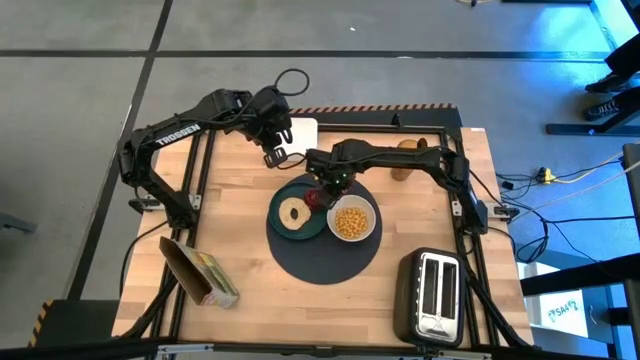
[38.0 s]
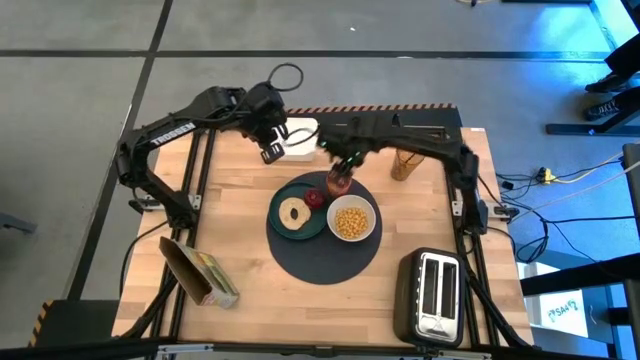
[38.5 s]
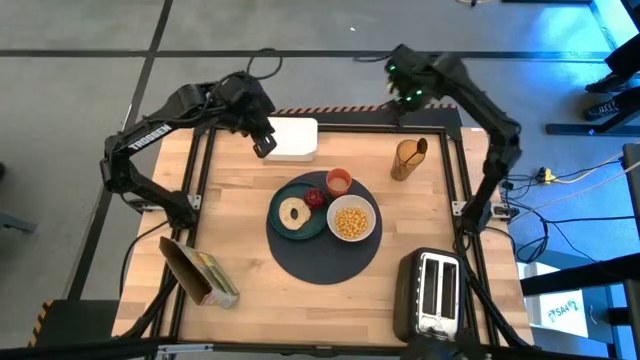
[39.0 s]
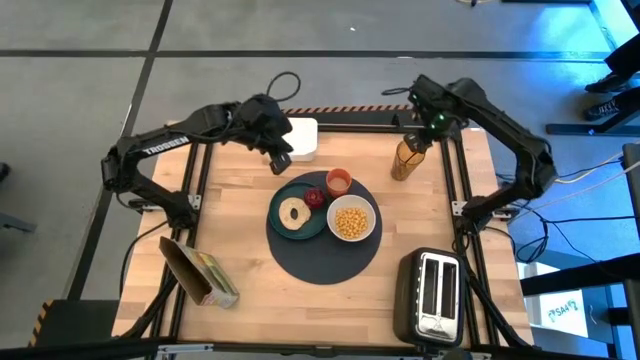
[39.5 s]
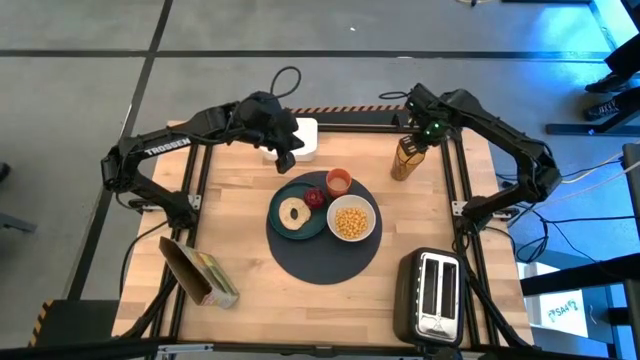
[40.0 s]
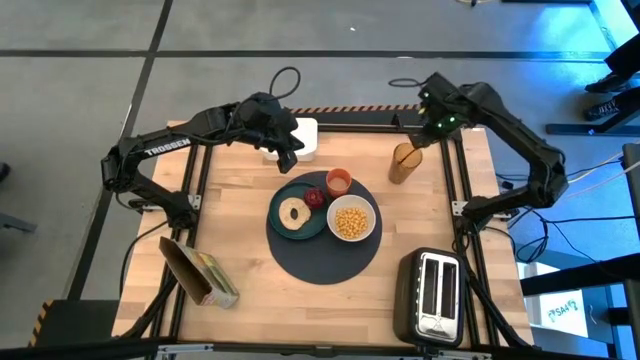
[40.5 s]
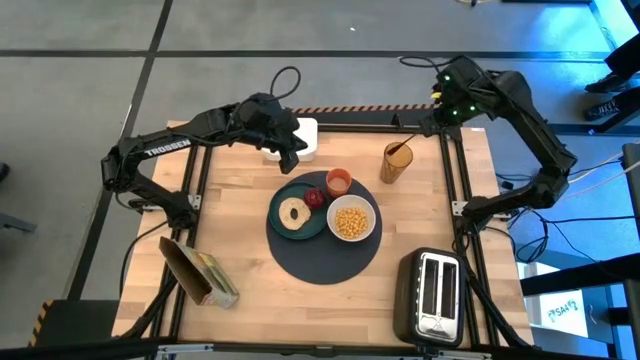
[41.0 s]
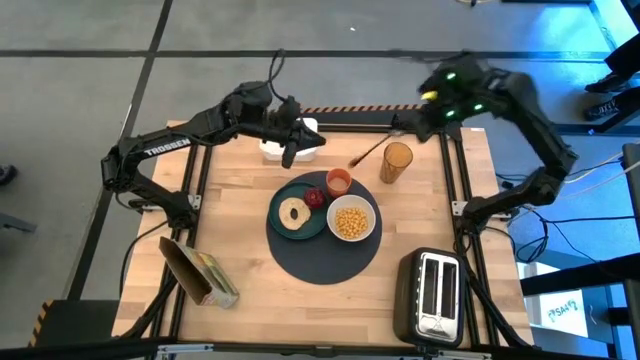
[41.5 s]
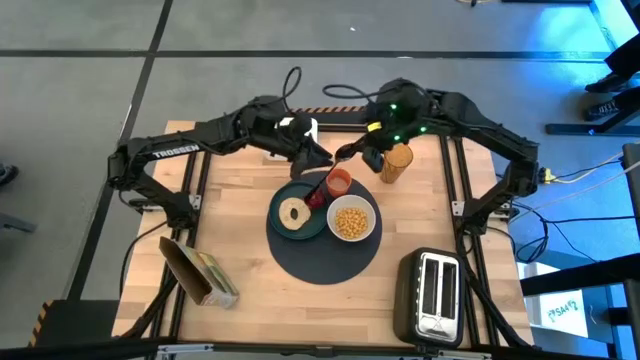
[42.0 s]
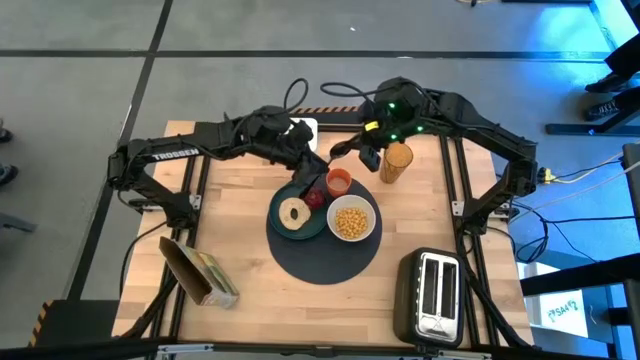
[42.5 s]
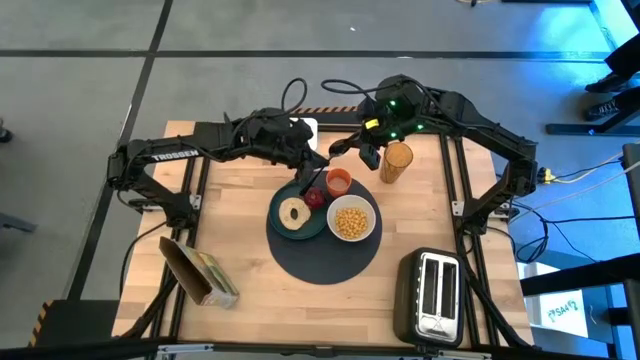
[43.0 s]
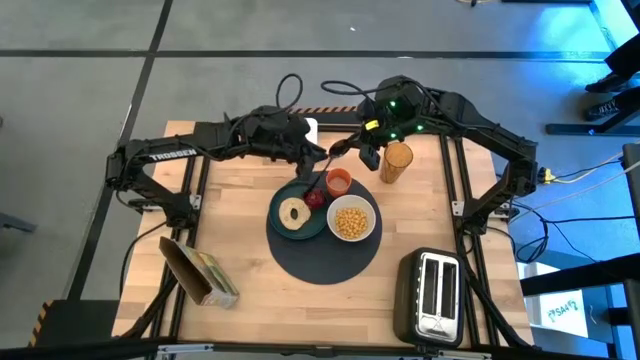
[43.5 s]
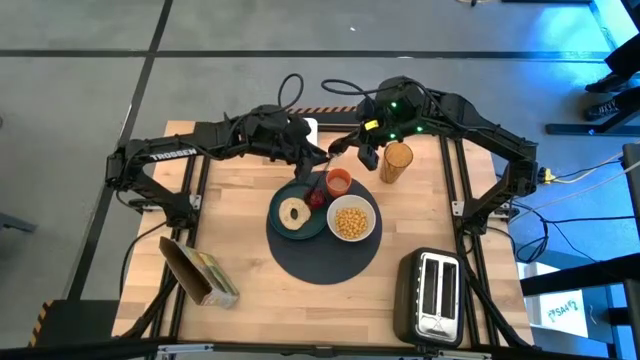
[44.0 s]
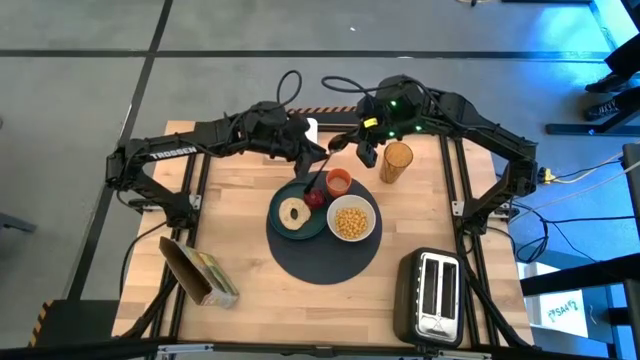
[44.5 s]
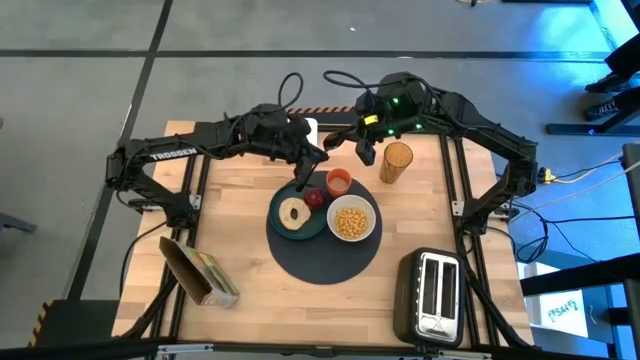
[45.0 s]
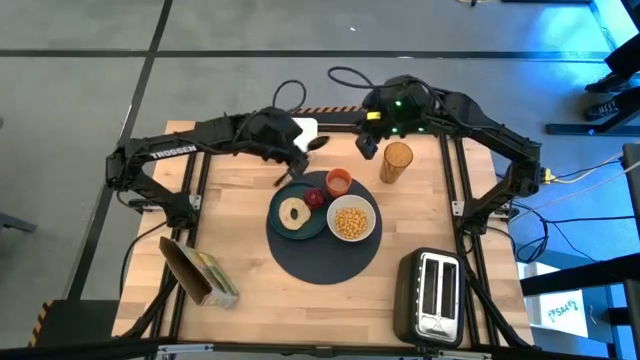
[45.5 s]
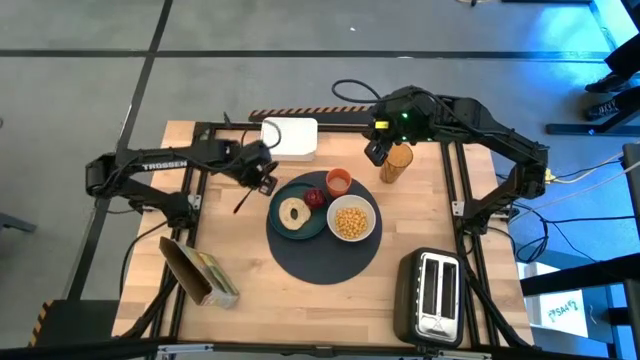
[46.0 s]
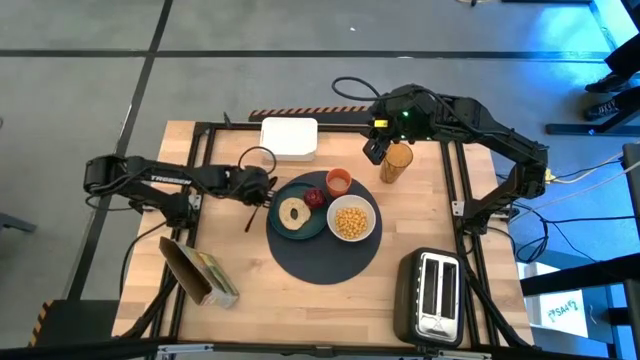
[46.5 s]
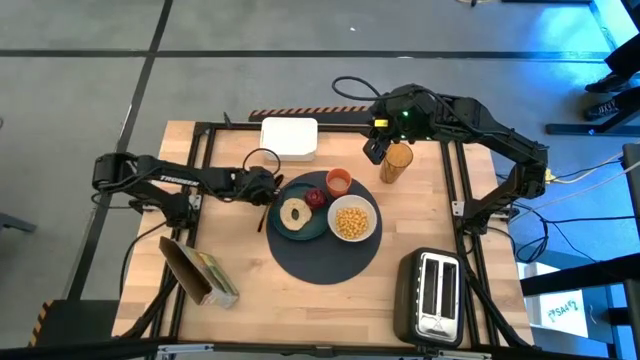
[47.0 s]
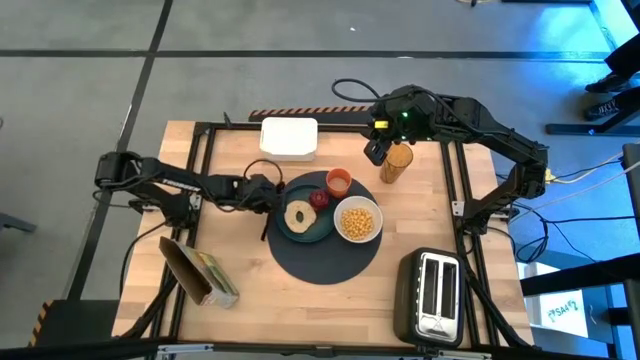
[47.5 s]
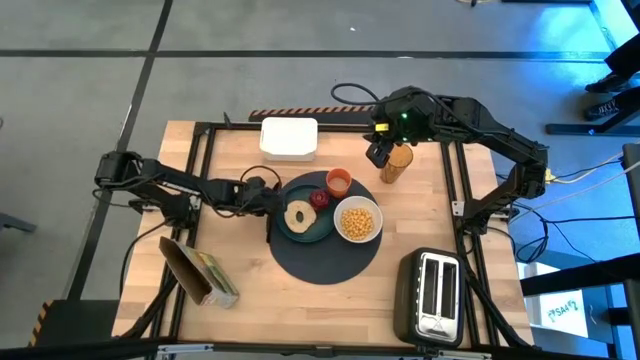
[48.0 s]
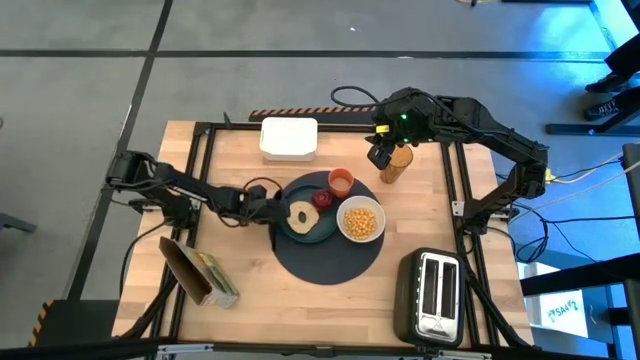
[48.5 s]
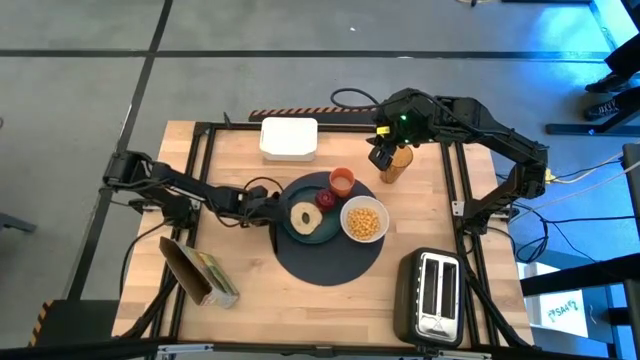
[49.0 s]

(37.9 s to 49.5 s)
Task: Arrange a breakfast setting
Put the spoon on the placemat to the left of the green plate

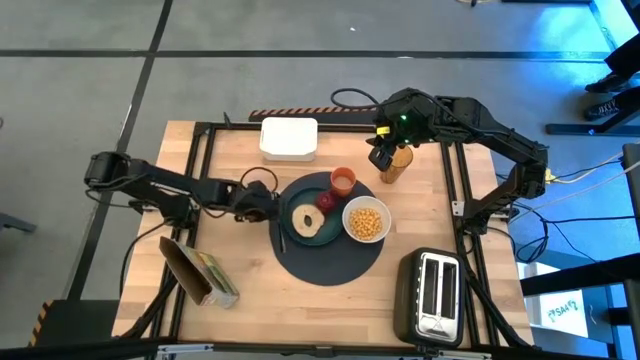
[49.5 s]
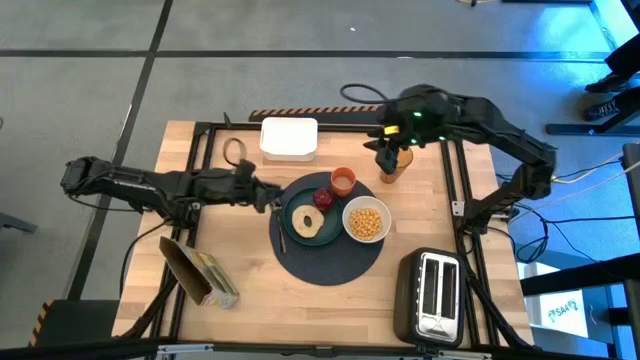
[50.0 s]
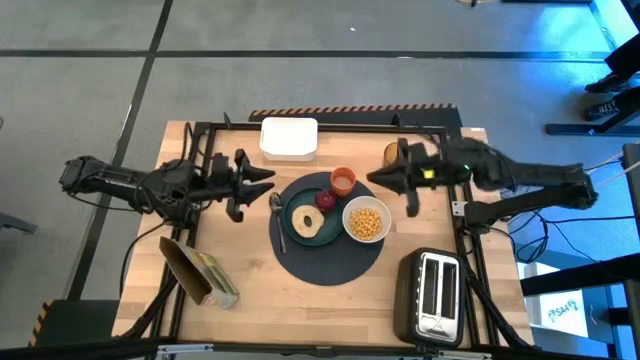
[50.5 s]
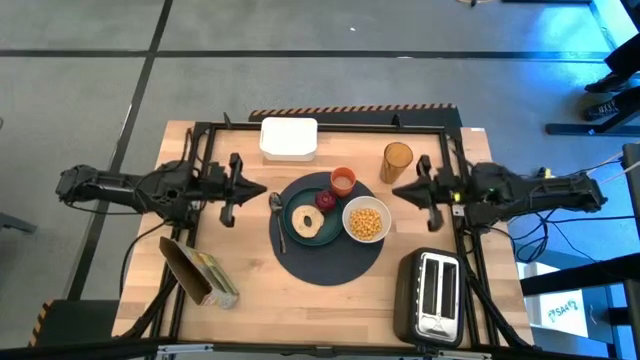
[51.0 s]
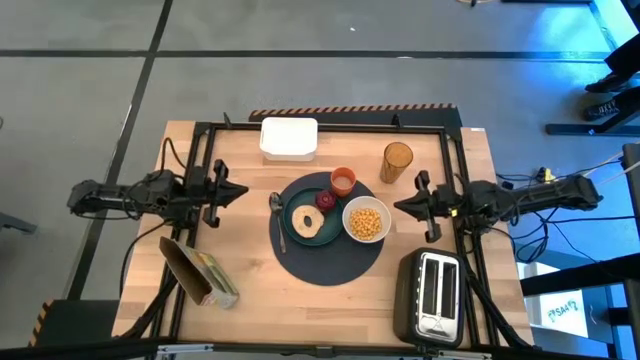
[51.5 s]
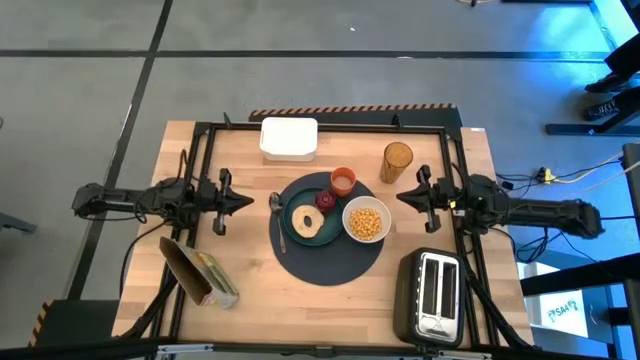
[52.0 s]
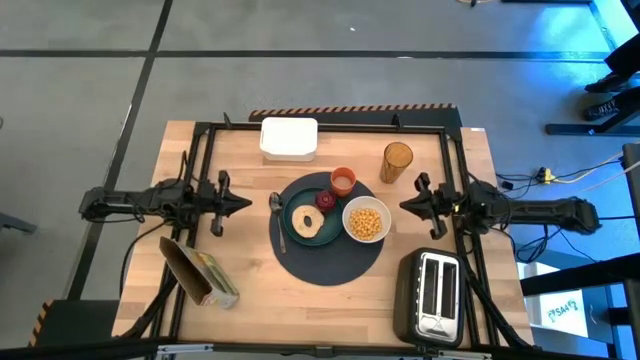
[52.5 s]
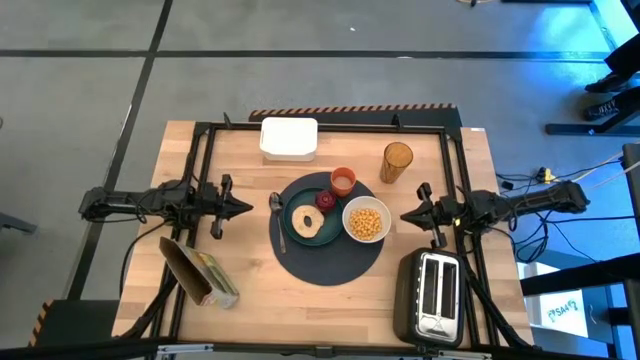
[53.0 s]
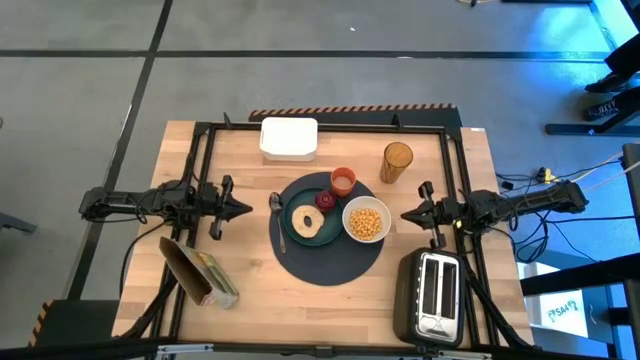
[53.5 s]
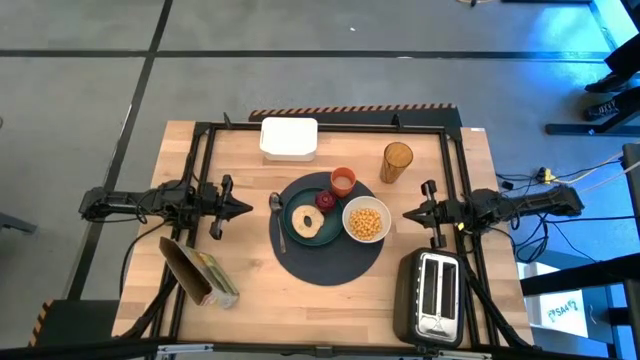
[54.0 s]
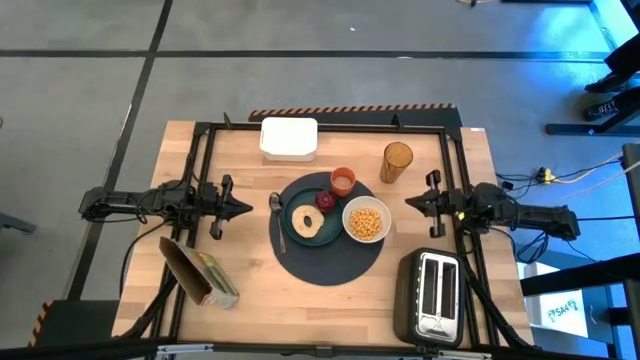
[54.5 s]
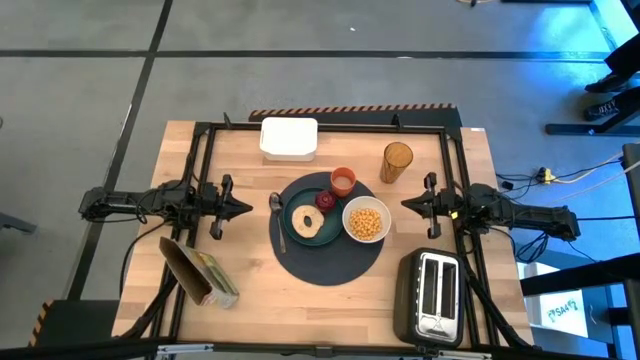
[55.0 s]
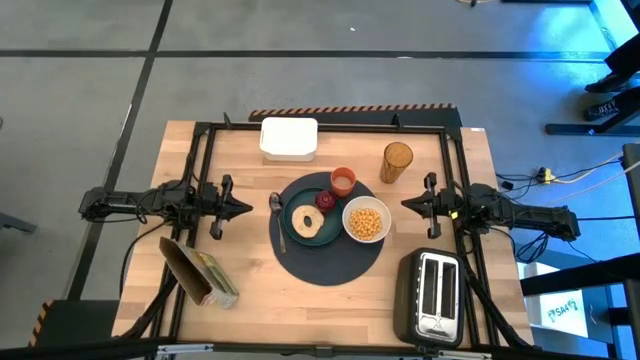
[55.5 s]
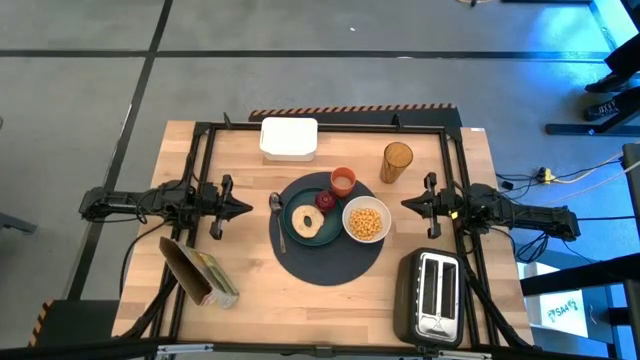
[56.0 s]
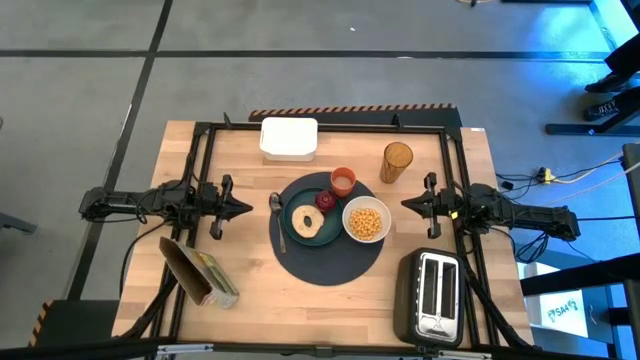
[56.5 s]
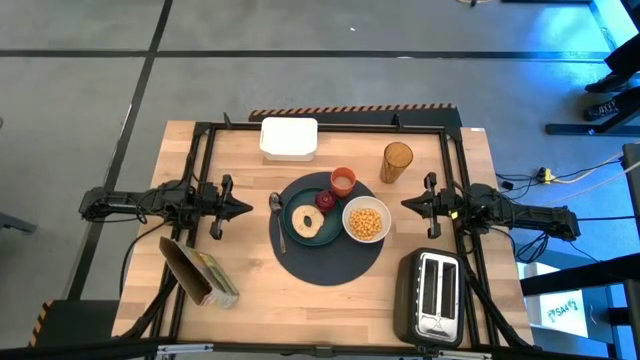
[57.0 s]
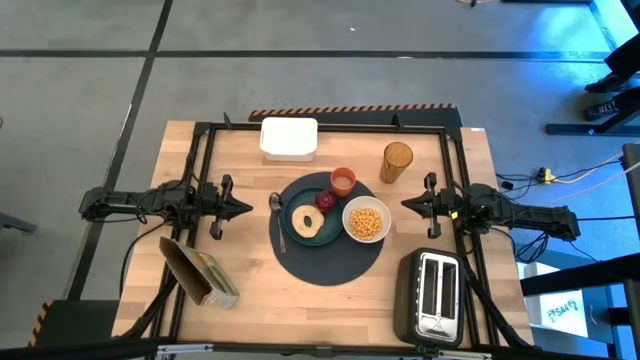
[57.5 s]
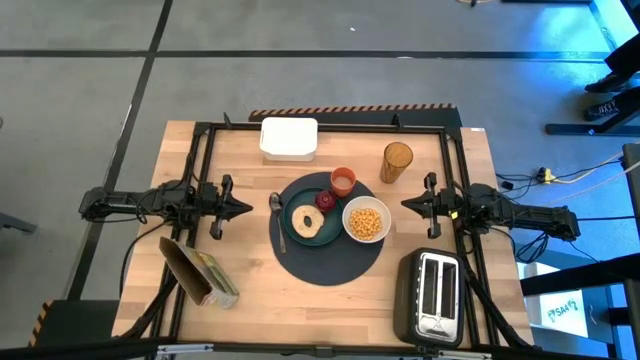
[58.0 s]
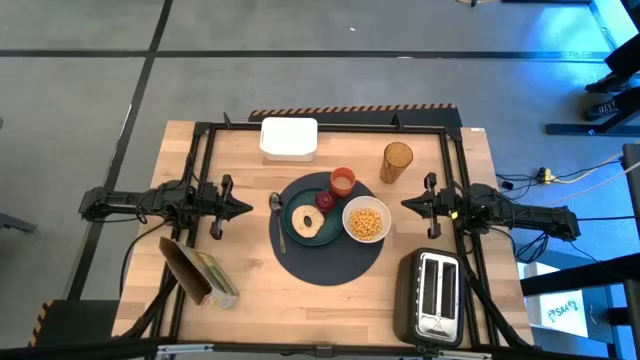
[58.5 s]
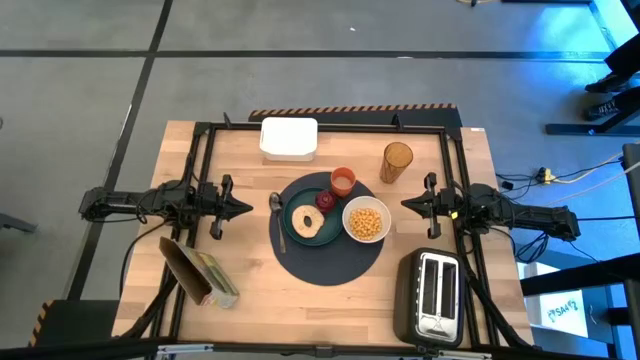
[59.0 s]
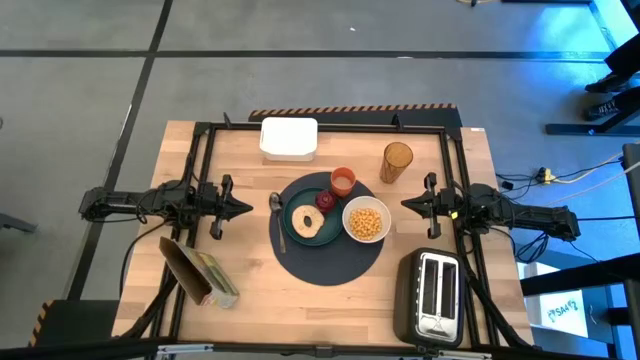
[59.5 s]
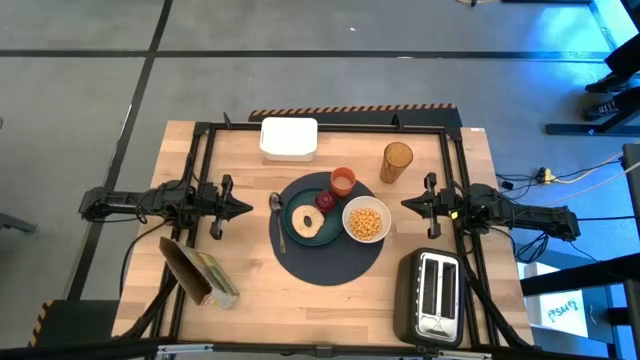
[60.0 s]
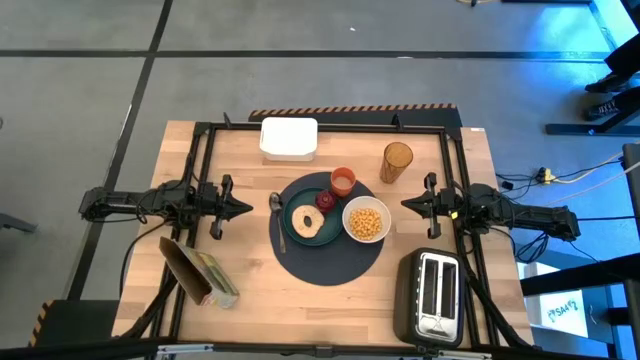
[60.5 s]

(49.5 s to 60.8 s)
Return to Home Position
